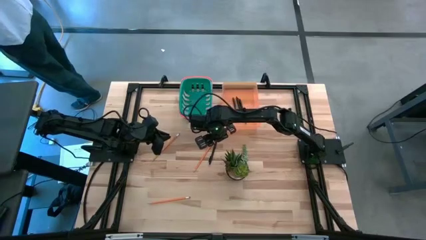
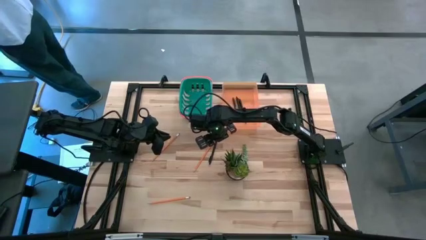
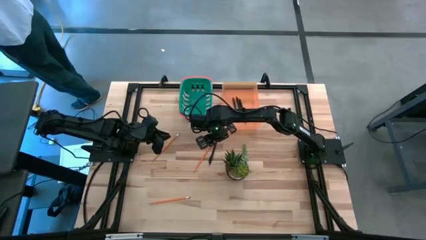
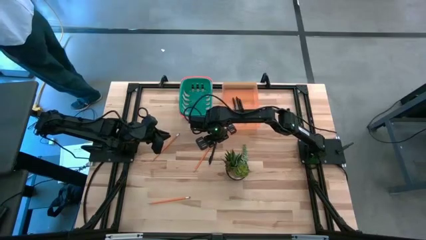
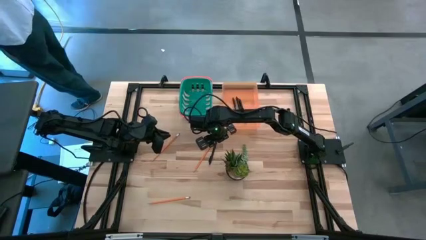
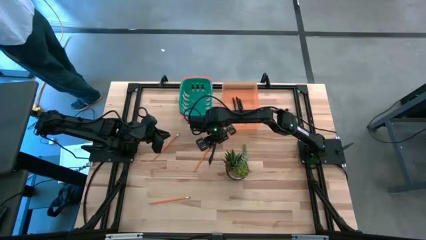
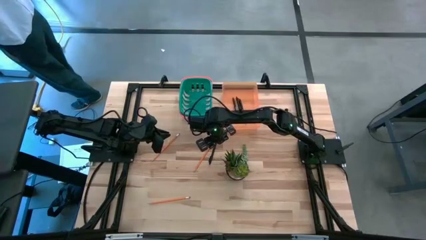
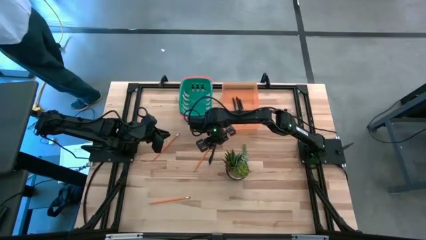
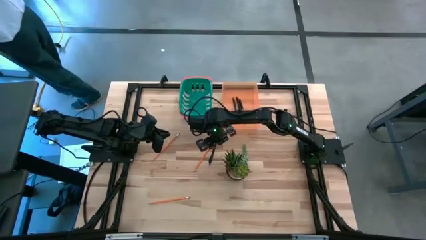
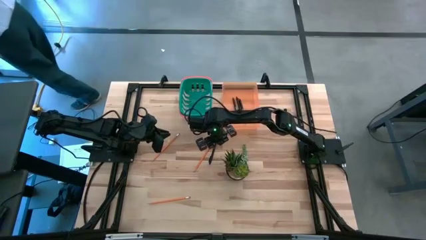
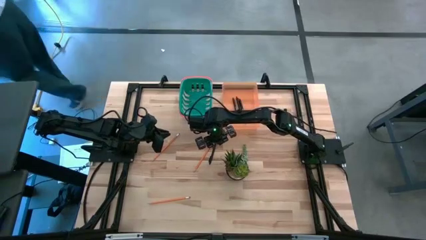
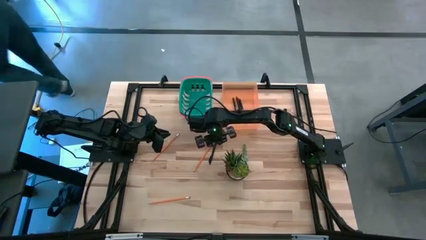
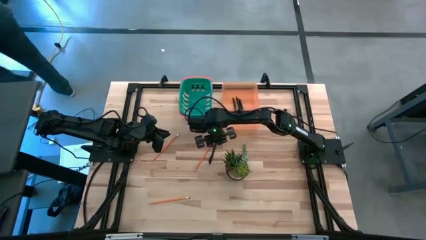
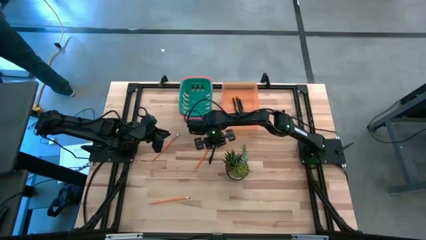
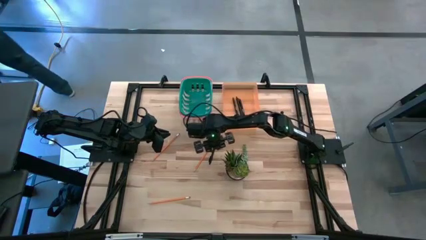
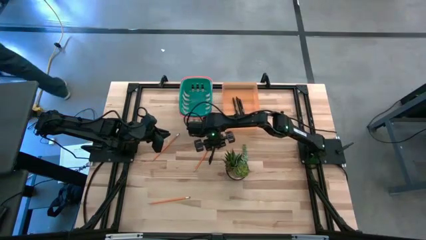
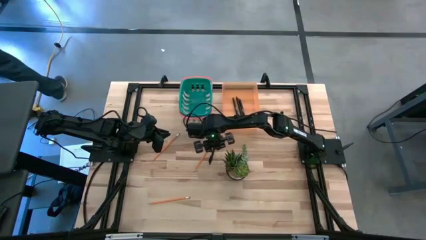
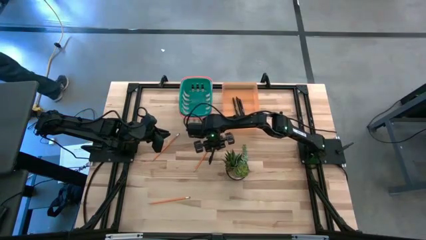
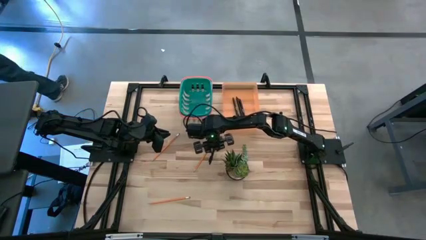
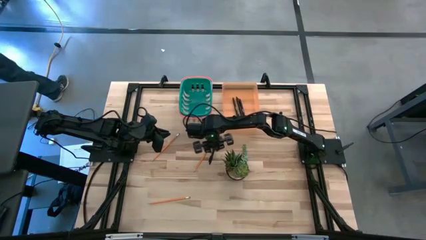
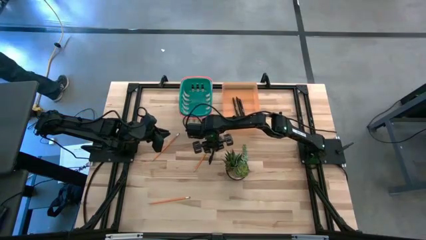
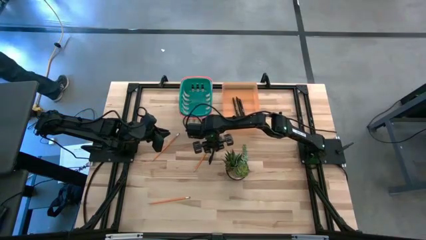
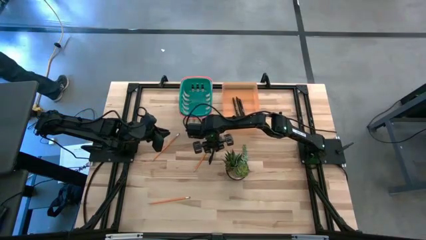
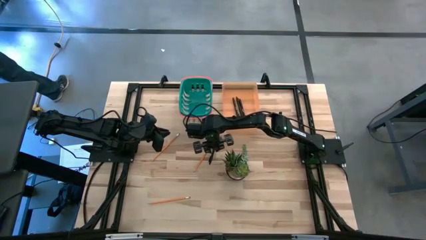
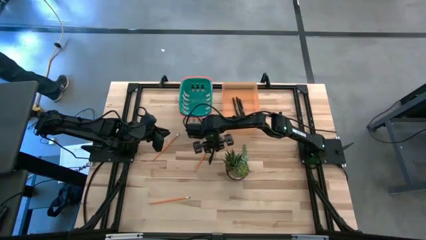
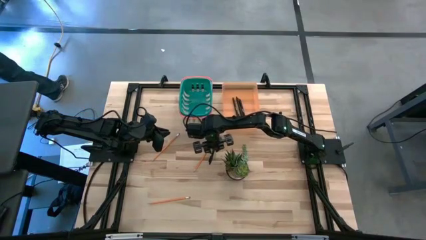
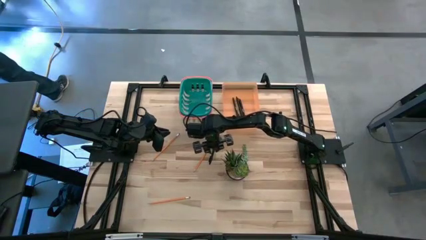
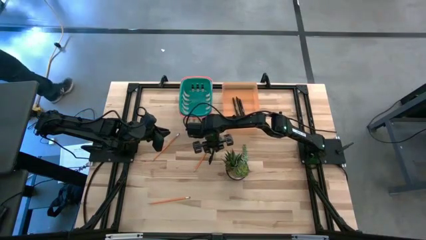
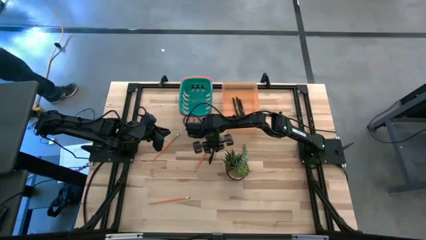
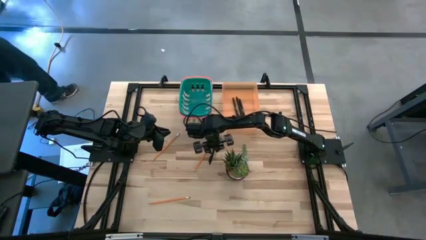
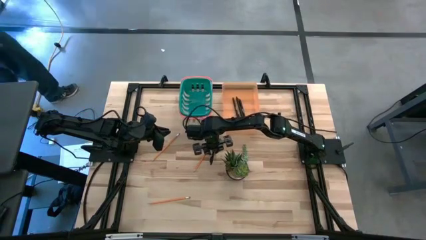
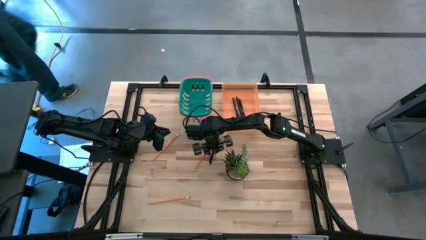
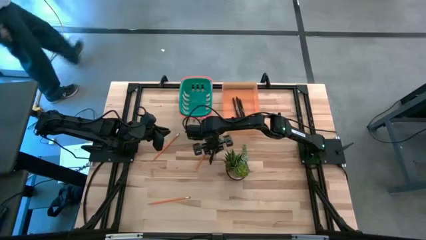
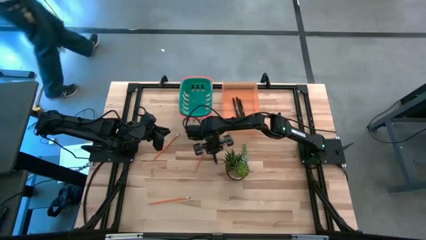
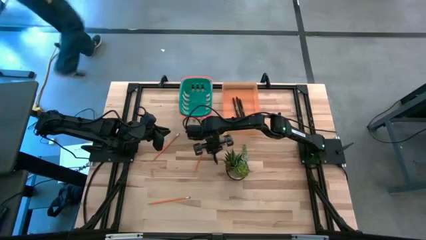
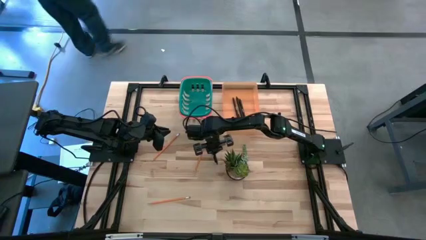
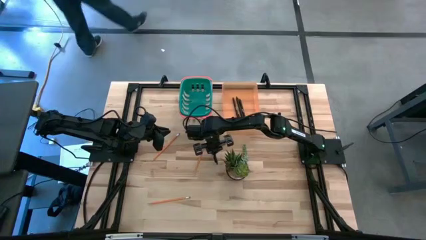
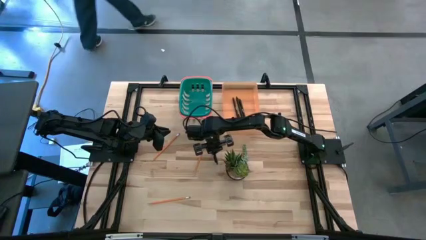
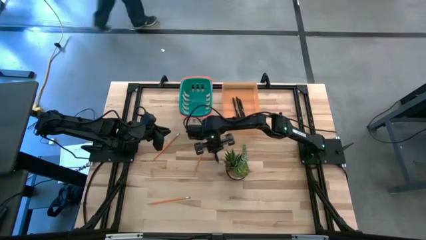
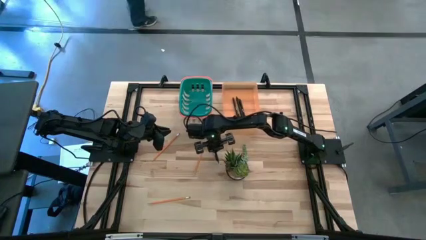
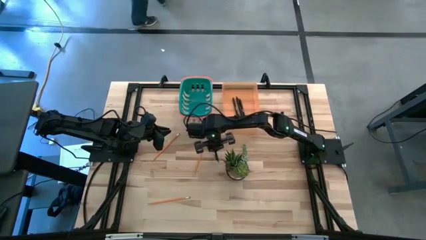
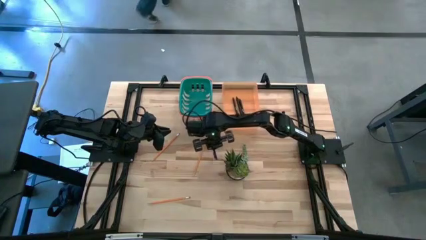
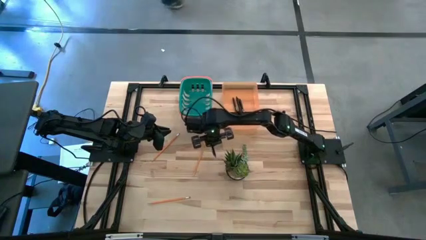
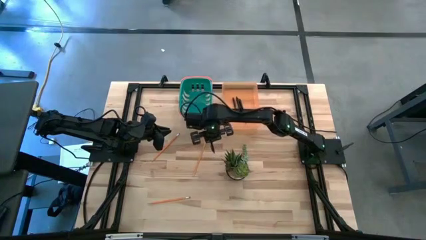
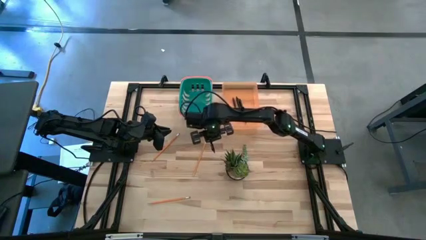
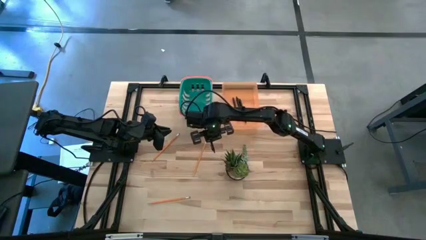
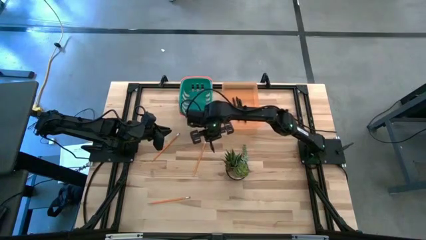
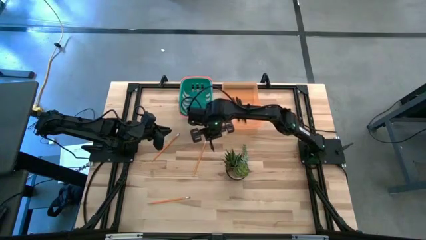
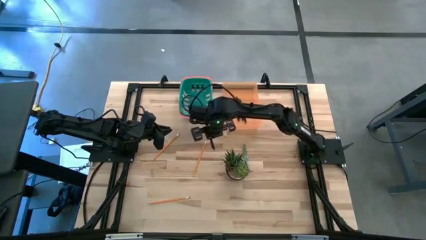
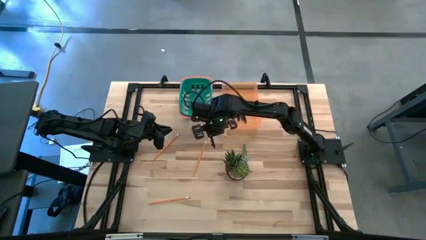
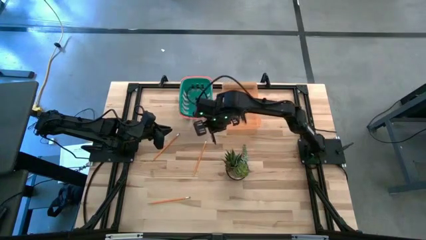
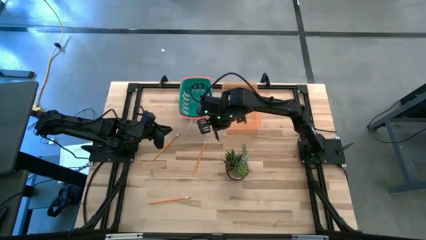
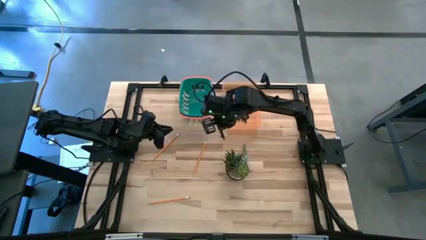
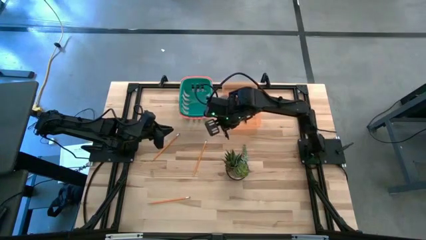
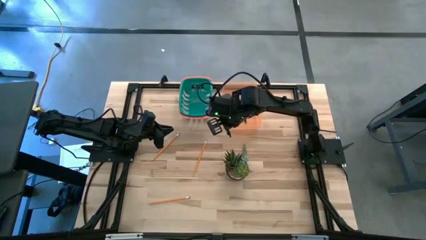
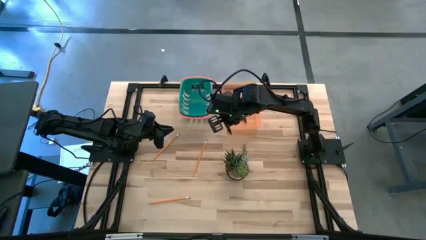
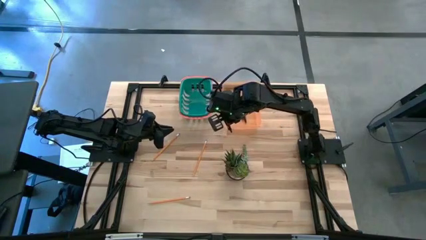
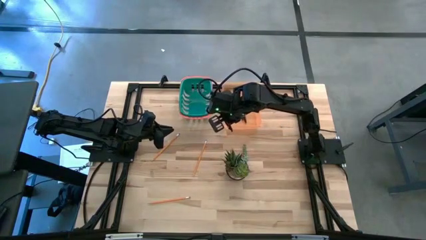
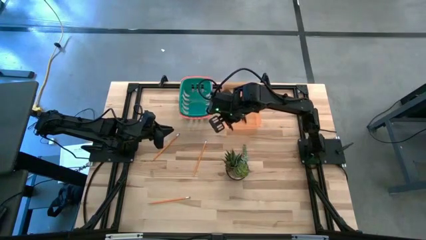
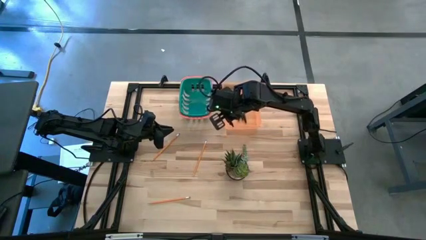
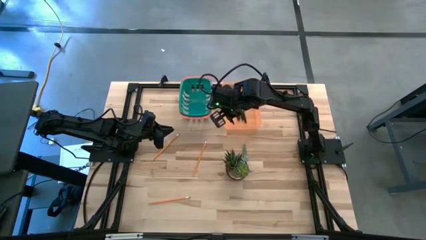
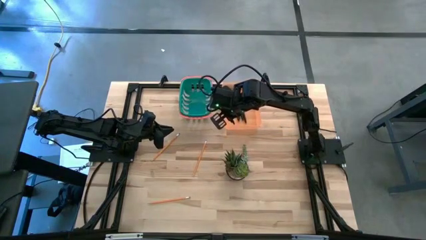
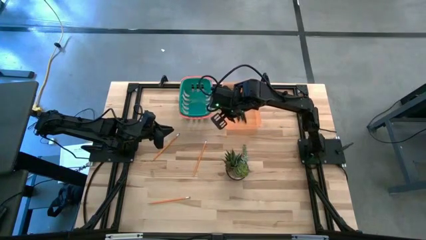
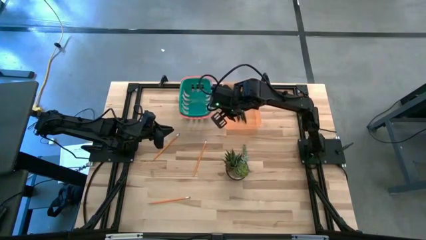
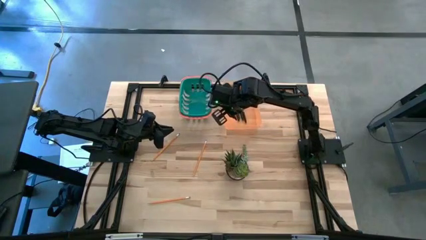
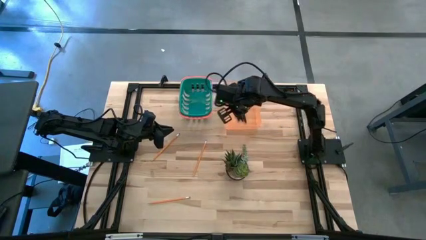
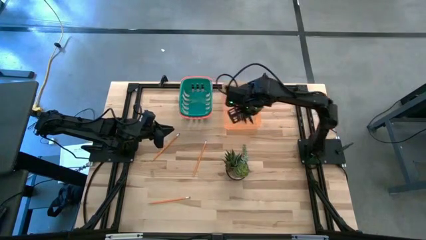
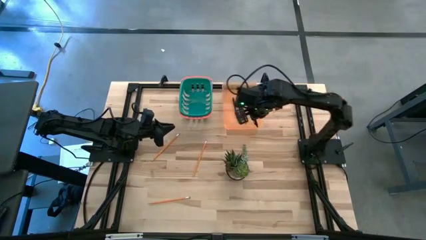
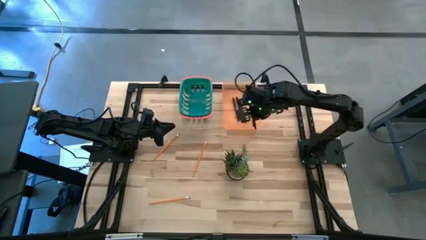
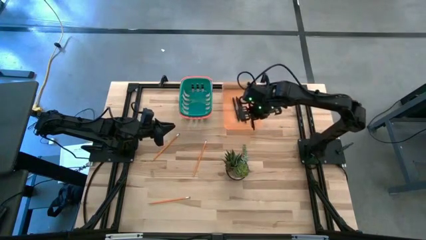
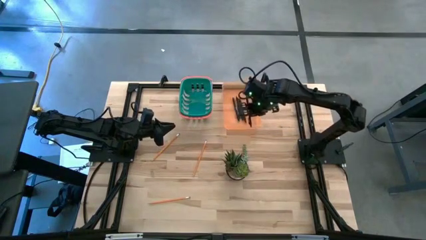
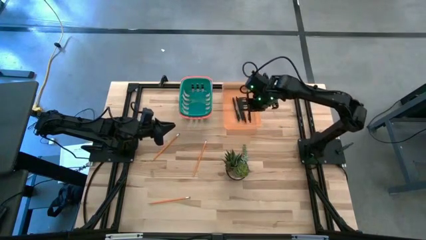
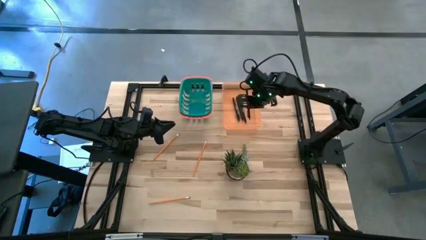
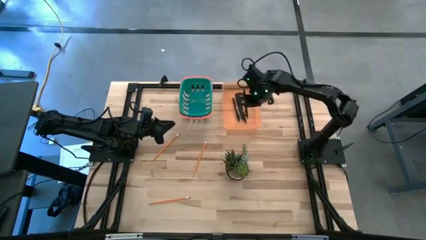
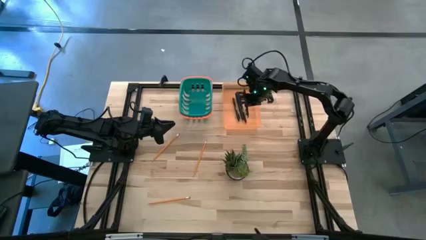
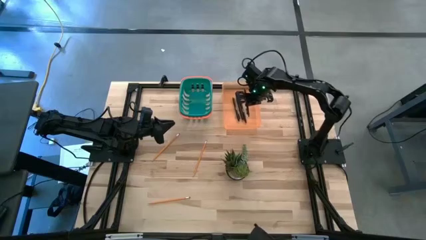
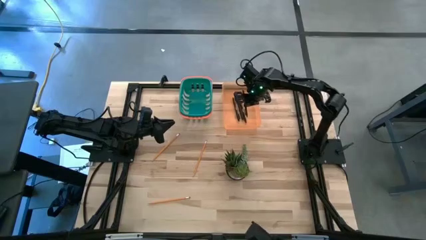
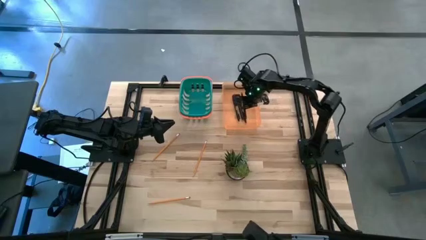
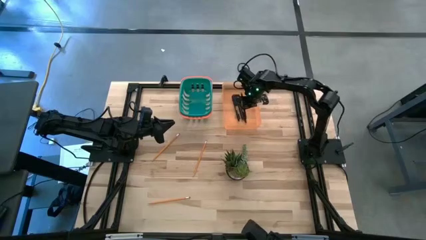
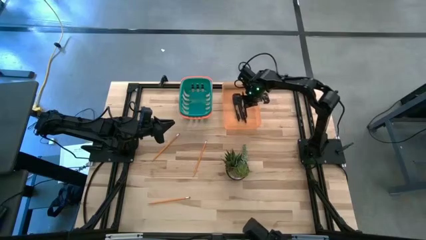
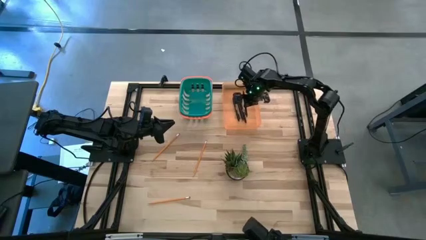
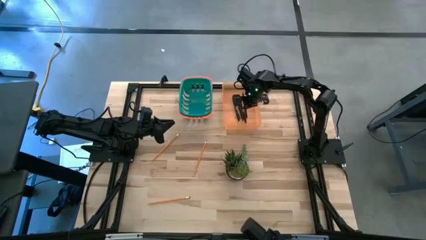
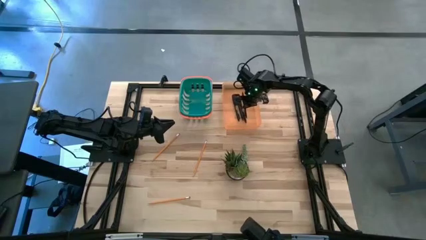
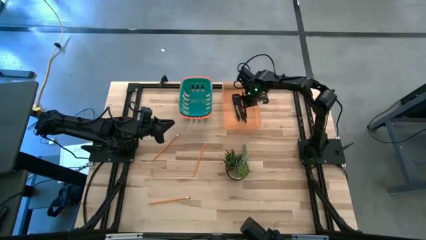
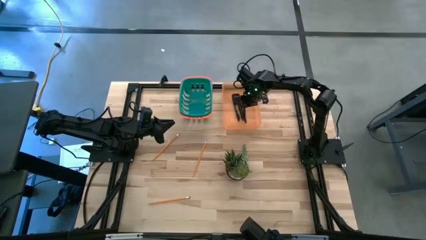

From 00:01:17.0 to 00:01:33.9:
Task: Sort pens & pencils
Put the black ballpoint pen into the orange bin
